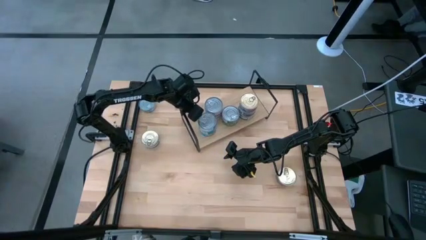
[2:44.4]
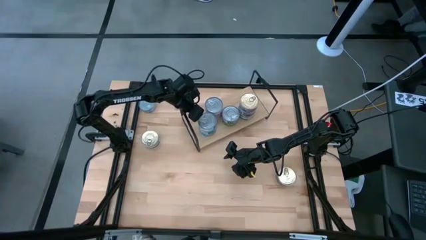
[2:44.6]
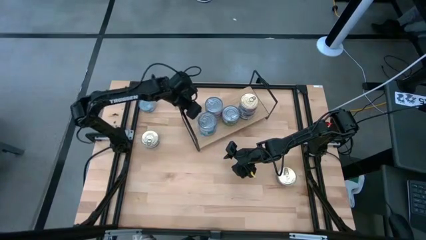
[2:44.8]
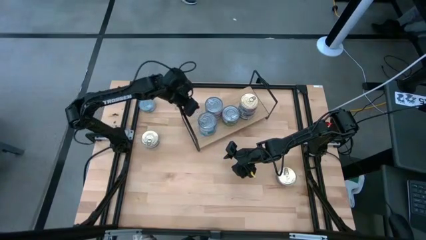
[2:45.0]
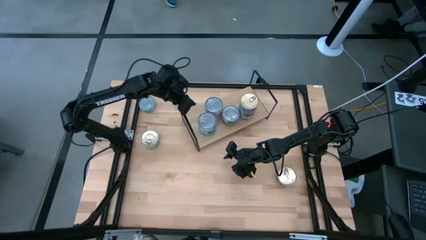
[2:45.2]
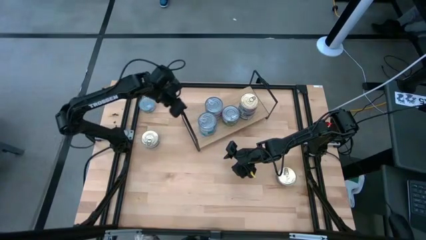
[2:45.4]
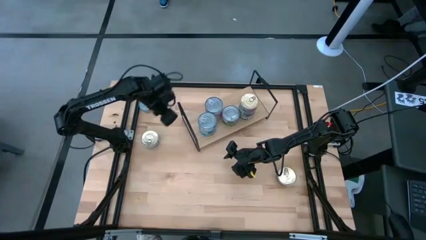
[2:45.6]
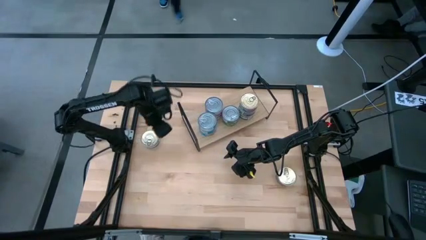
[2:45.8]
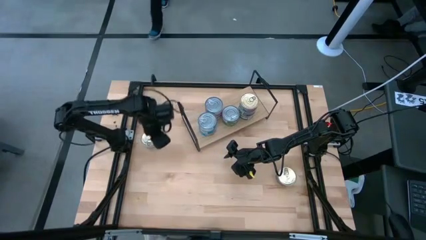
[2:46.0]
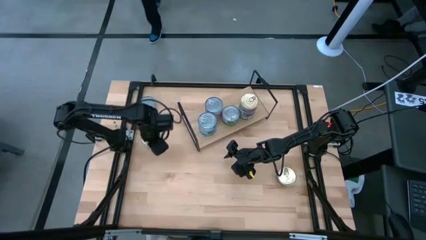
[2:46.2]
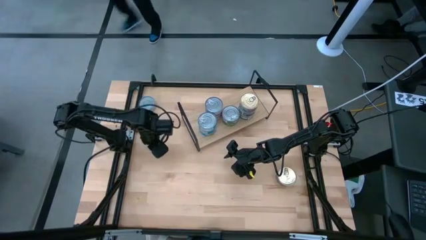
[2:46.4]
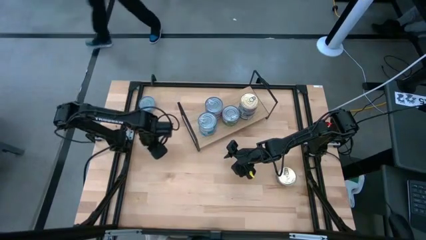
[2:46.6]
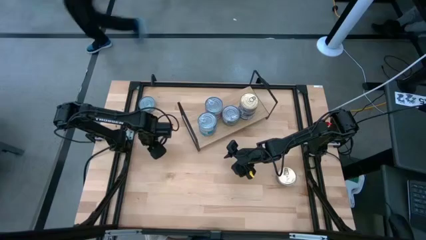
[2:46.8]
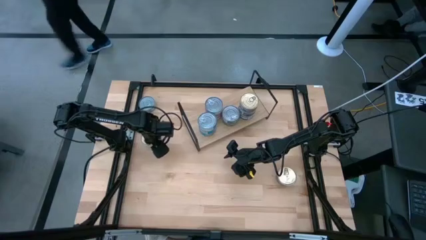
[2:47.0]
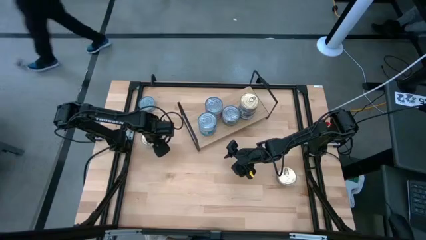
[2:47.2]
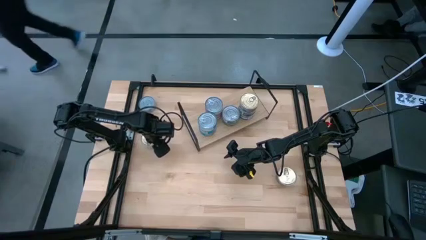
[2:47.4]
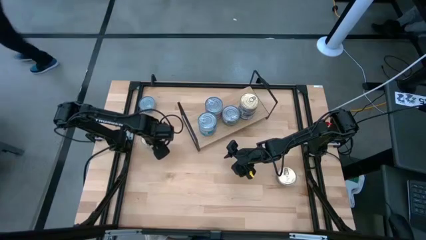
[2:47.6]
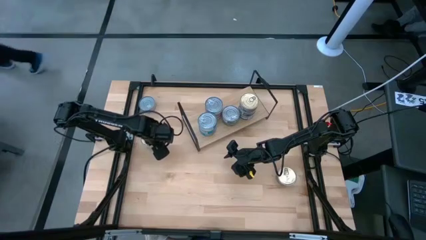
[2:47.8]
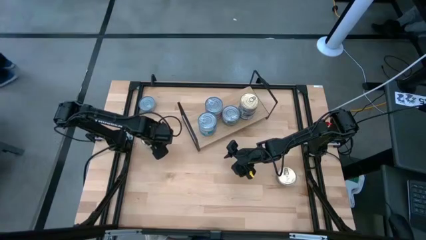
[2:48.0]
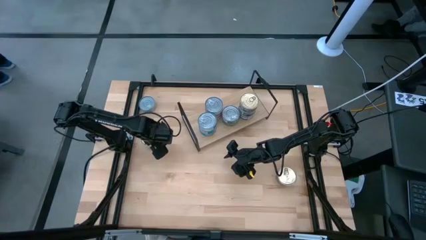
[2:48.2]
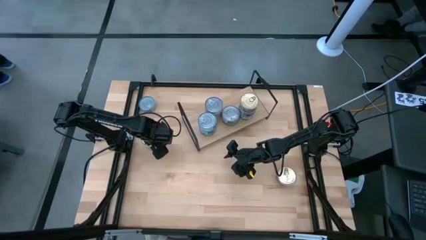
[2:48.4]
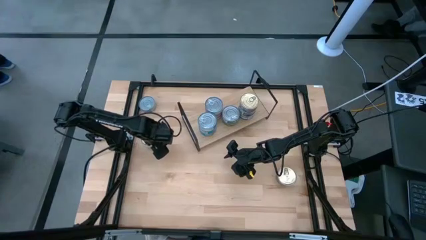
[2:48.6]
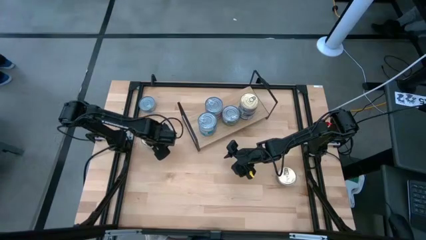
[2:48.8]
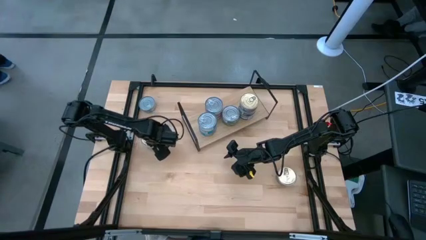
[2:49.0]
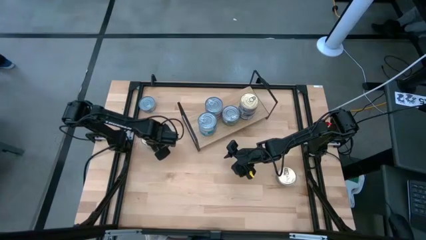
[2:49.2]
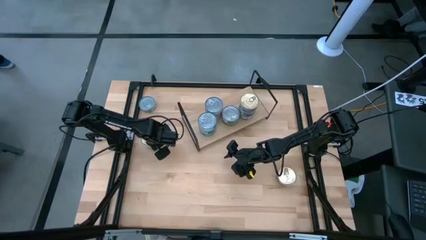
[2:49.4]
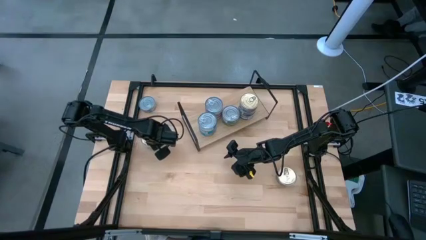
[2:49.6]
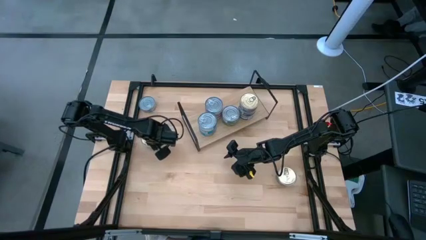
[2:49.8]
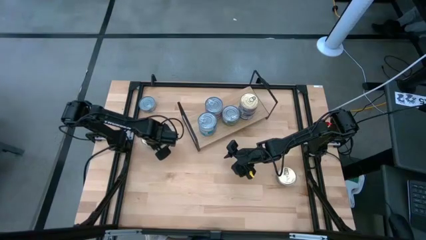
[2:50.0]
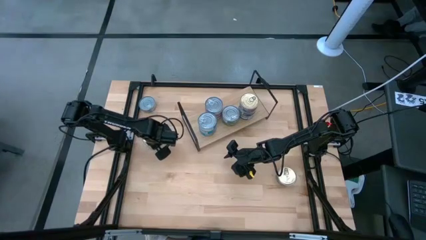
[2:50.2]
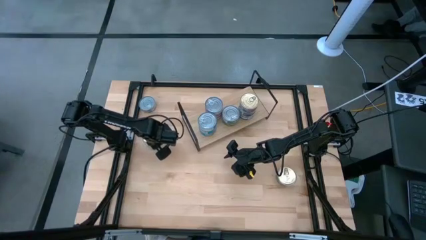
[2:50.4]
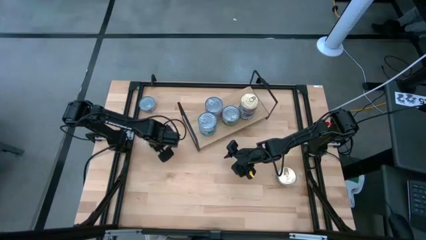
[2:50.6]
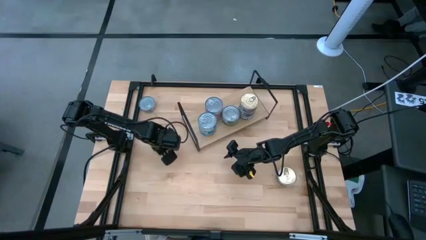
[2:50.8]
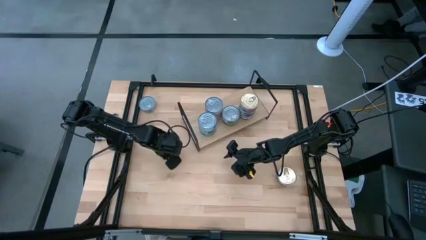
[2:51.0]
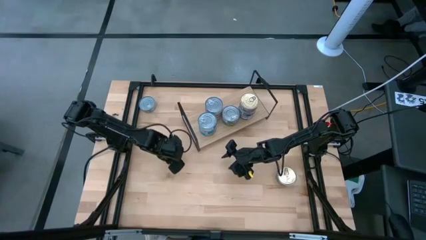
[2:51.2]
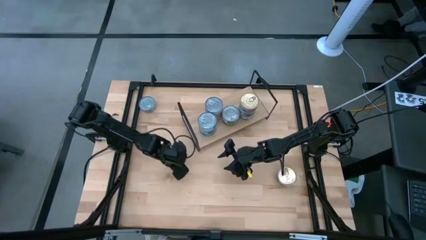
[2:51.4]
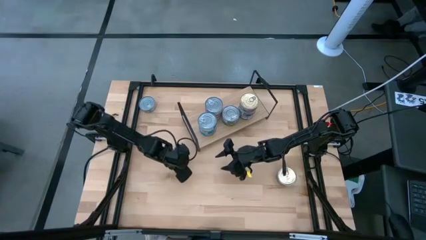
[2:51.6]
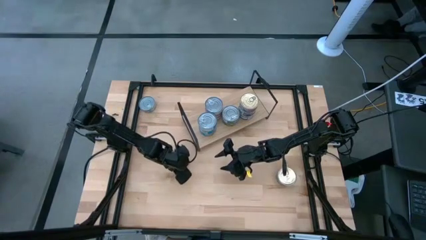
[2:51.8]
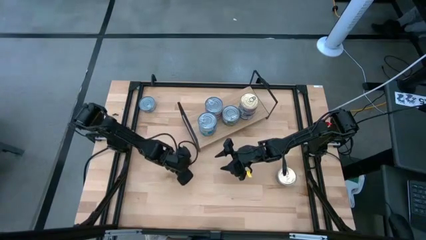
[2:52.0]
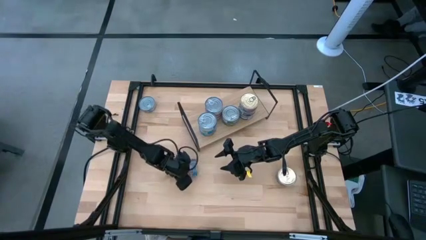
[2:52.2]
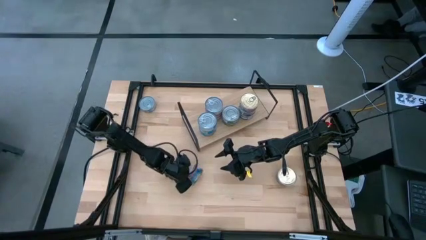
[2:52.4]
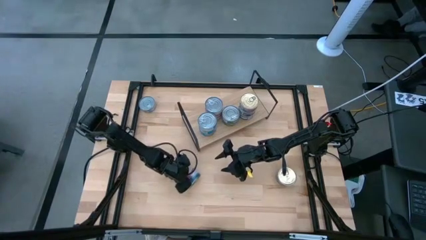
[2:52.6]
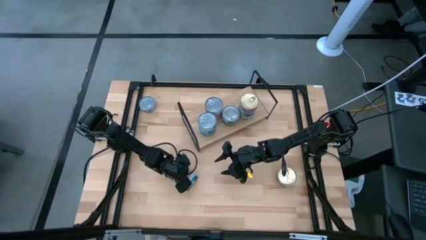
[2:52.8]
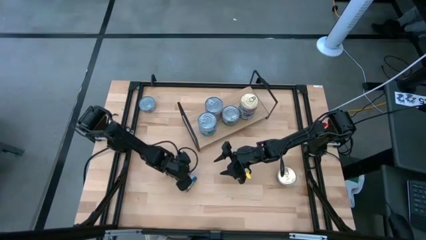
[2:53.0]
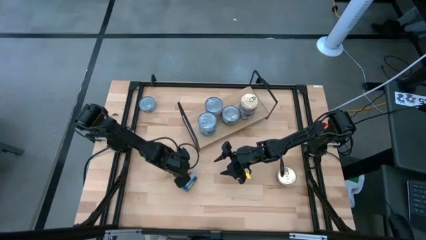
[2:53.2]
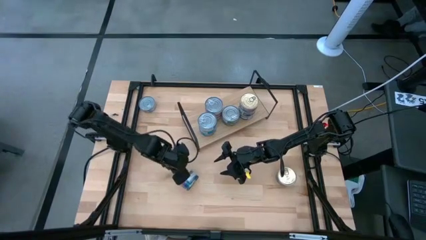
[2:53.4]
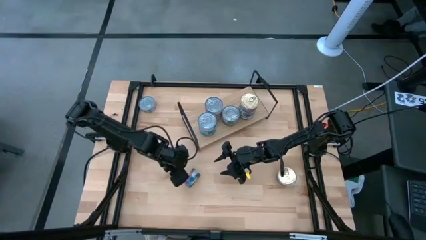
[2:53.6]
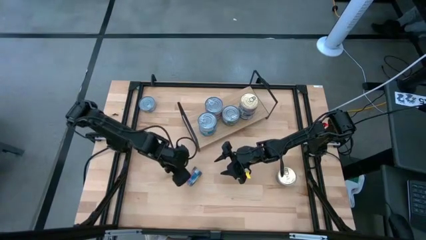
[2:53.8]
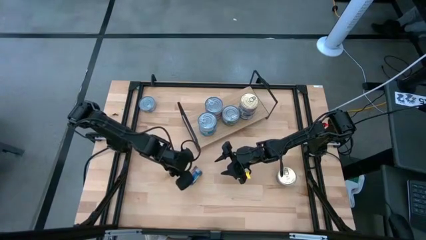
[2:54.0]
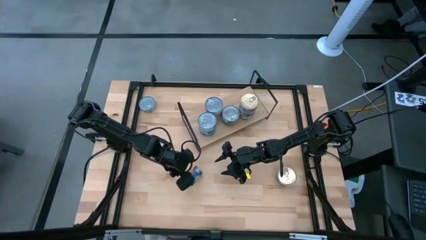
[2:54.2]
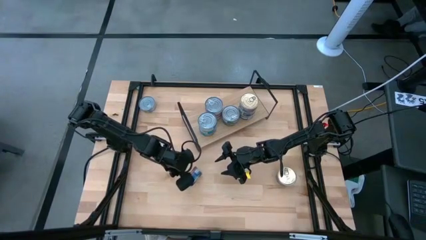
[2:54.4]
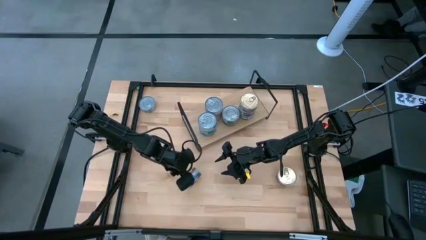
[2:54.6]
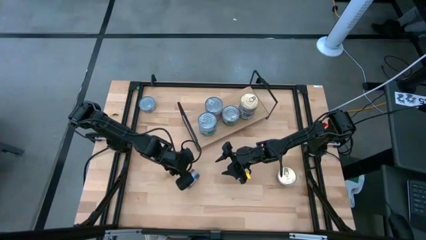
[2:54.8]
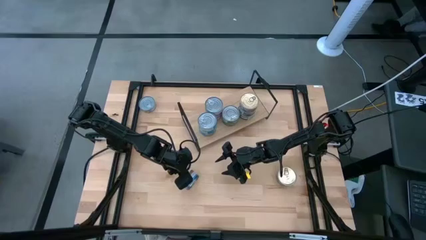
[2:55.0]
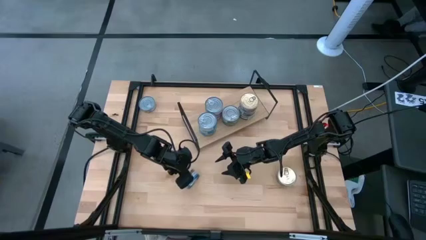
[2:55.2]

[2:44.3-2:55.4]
Task: Stack canned seafood by type on shelf
Stack the blue and pink tuna can on the shelf on top of the other blue and pink tuna can

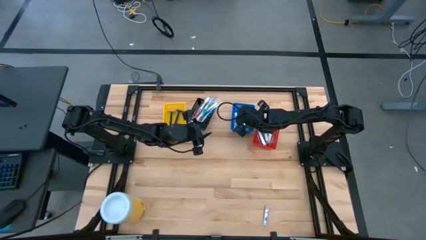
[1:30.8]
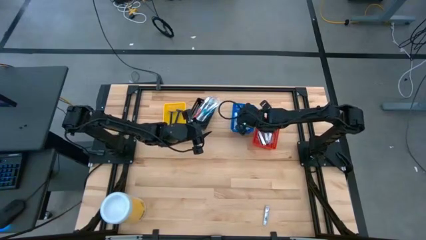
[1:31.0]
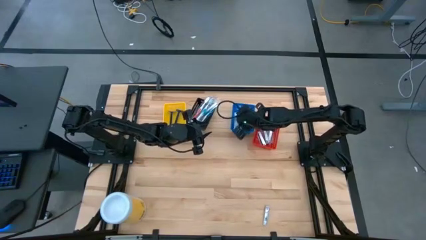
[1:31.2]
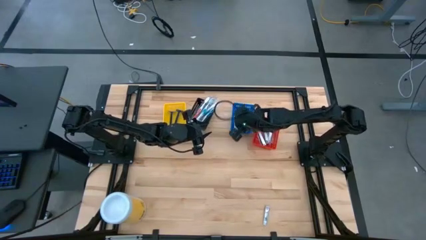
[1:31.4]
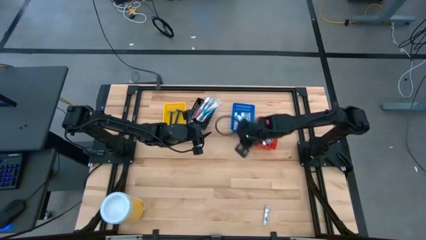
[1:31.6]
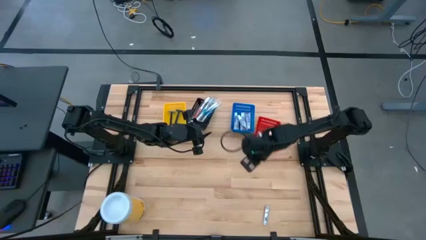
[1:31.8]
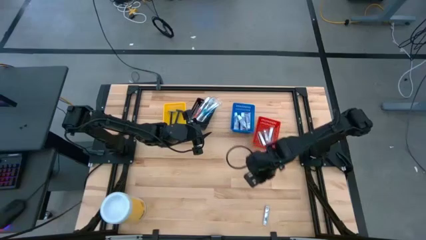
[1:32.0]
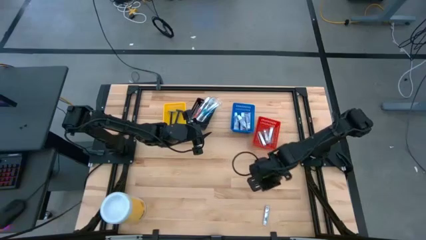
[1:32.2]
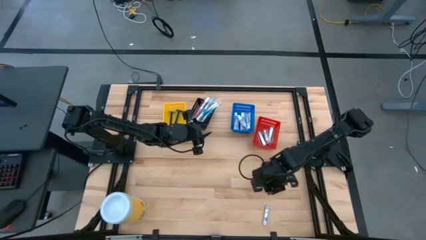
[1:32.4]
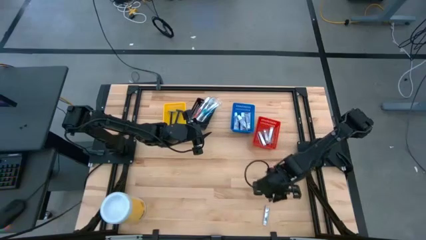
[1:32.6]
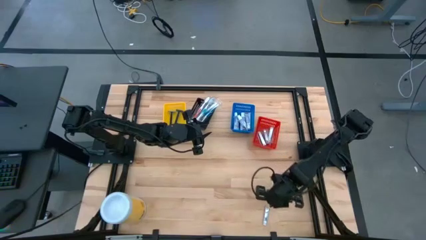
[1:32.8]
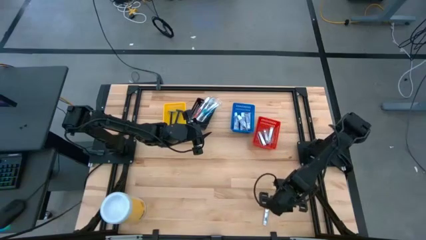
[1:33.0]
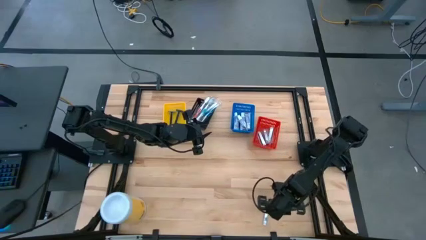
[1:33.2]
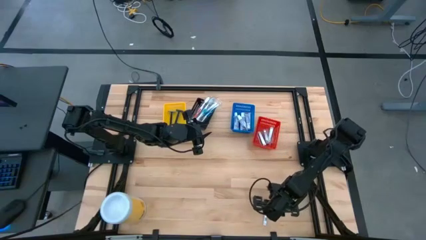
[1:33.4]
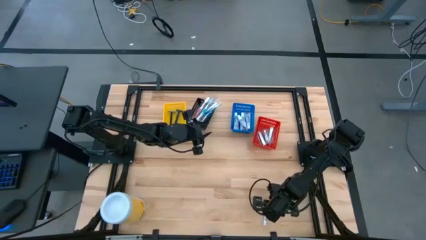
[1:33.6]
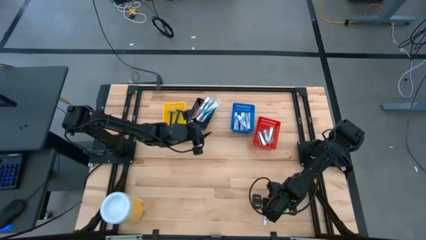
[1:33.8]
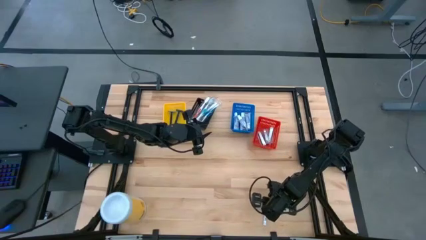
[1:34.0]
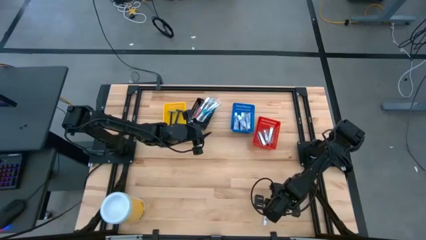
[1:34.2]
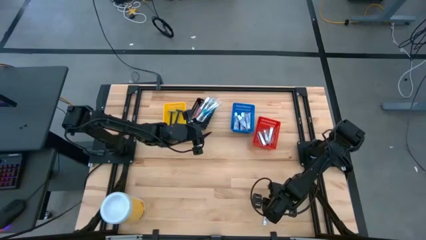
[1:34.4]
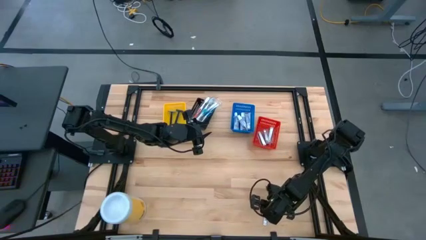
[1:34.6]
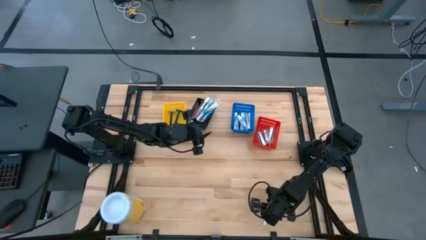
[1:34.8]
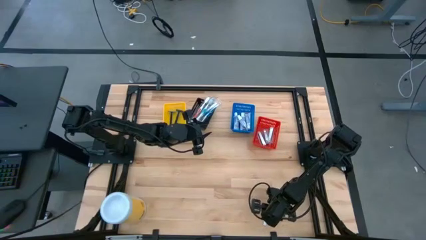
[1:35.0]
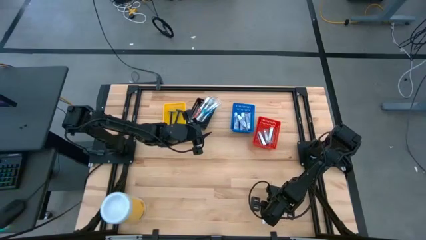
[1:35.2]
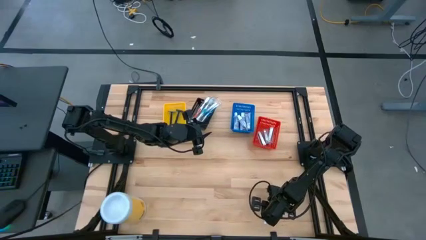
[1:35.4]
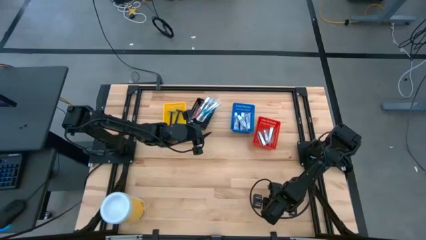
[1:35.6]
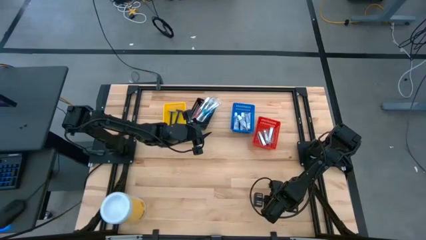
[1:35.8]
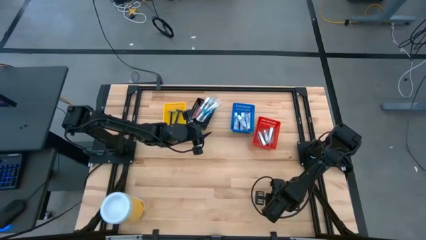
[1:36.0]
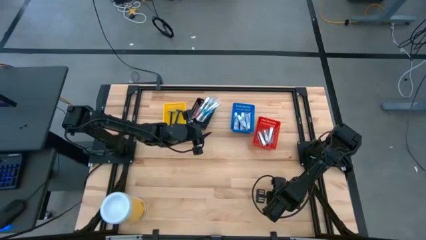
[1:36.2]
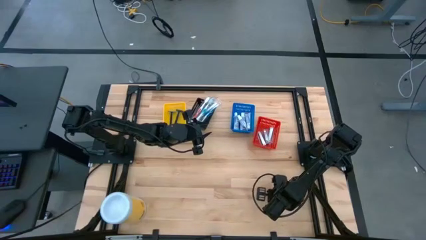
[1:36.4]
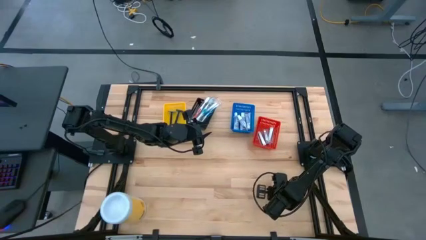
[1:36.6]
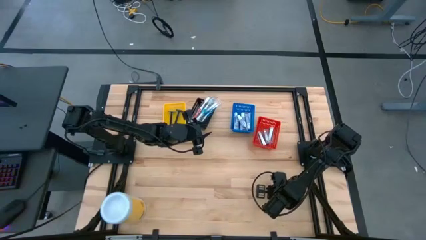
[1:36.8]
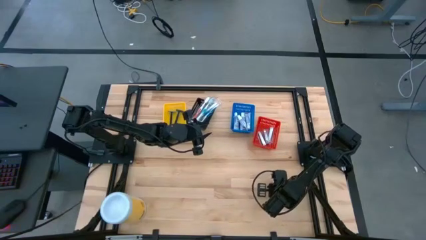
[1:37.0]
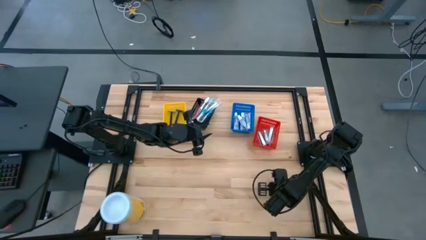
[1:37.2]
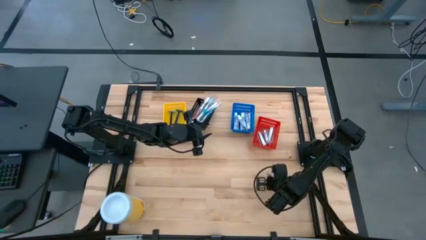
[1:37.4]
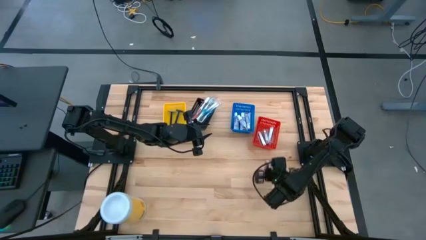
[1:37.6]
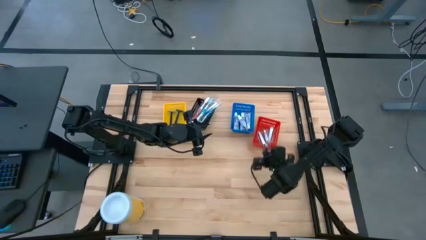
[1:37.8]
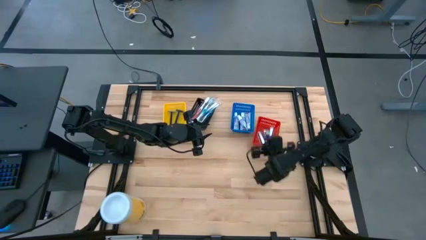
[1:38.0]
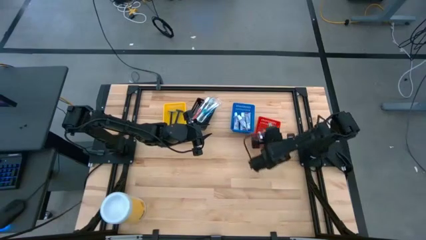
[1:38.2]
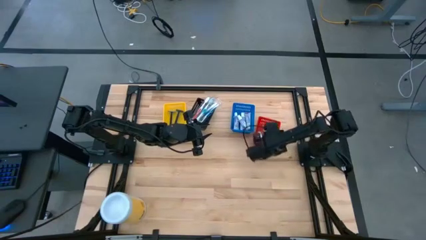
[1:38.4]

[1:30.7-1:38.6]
Task: Pick & Place Travel size toiletries
Put the silver nail cutter into the red bin
